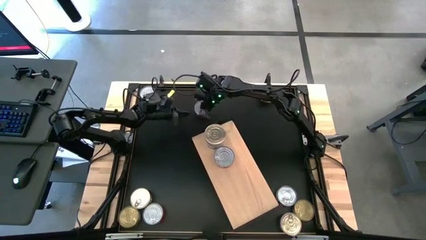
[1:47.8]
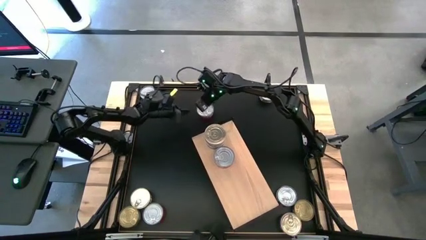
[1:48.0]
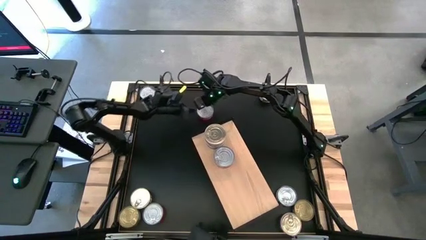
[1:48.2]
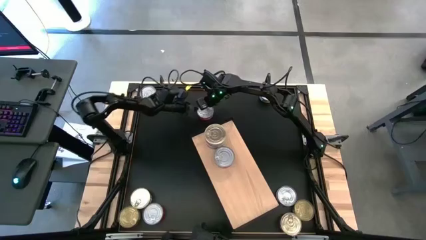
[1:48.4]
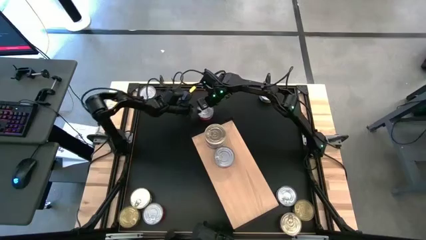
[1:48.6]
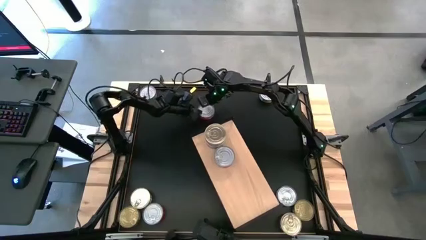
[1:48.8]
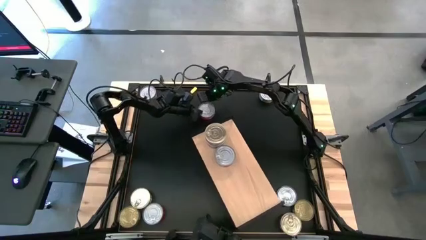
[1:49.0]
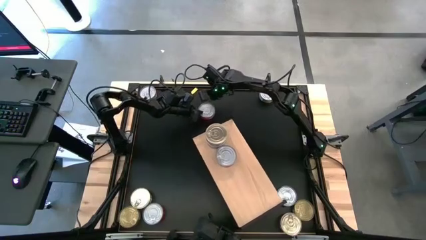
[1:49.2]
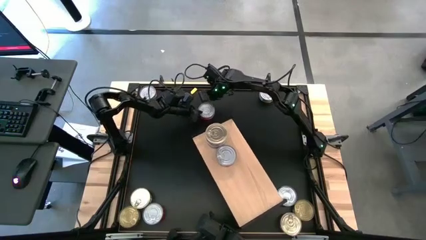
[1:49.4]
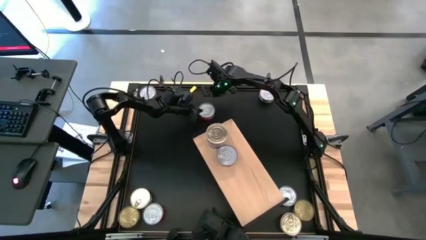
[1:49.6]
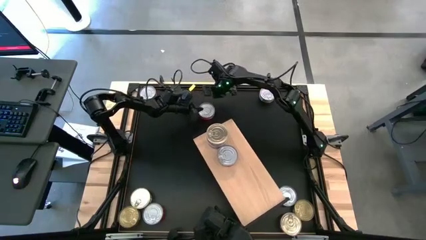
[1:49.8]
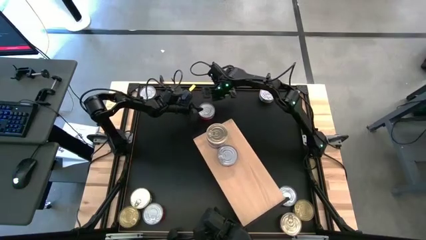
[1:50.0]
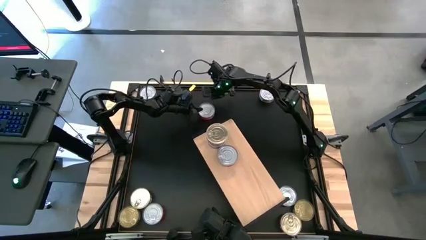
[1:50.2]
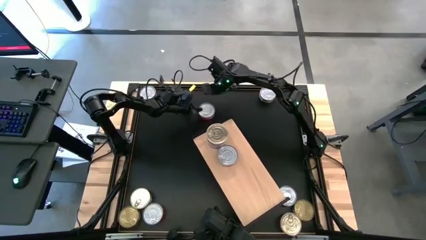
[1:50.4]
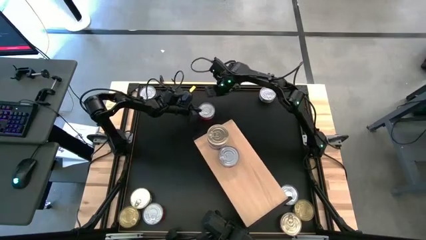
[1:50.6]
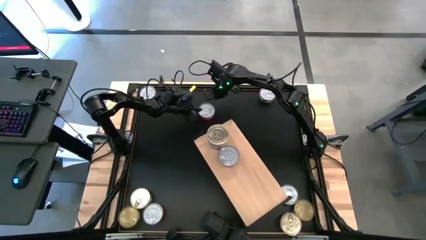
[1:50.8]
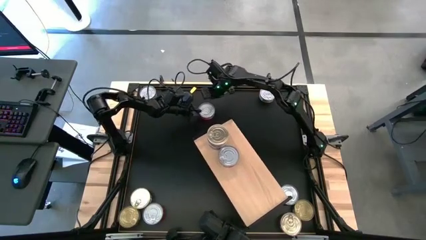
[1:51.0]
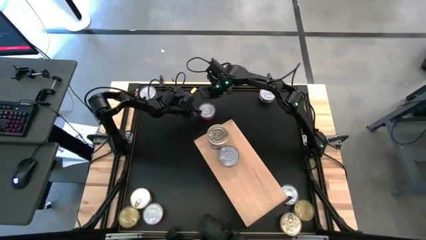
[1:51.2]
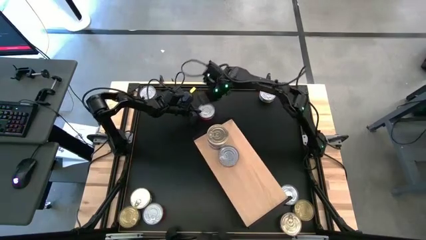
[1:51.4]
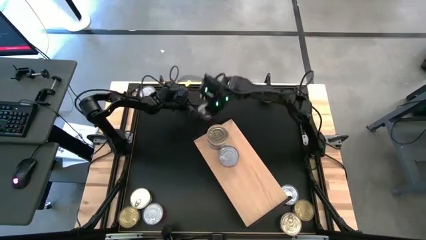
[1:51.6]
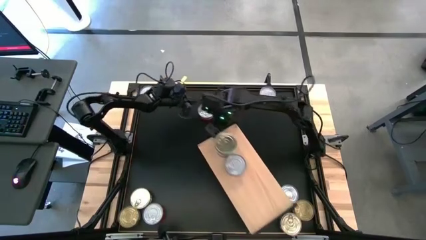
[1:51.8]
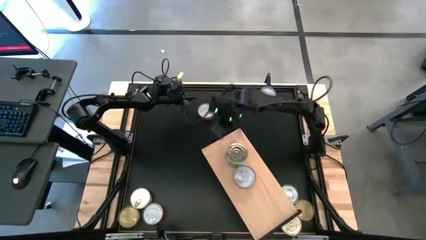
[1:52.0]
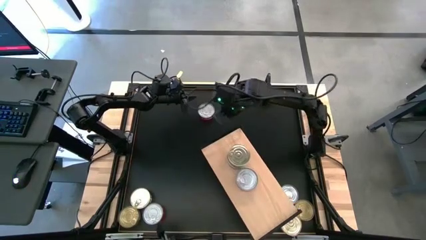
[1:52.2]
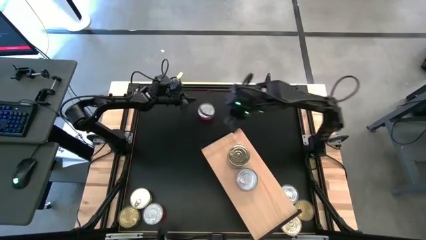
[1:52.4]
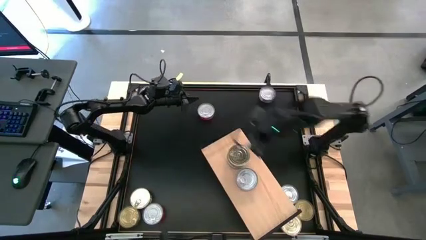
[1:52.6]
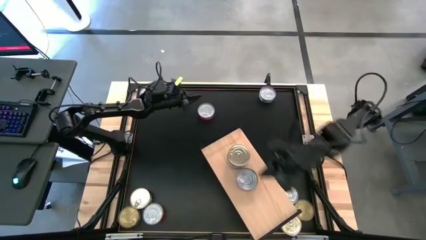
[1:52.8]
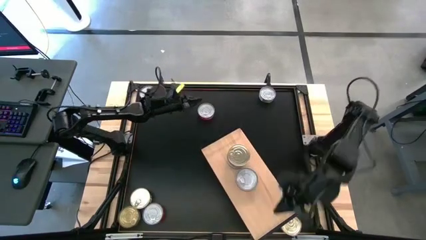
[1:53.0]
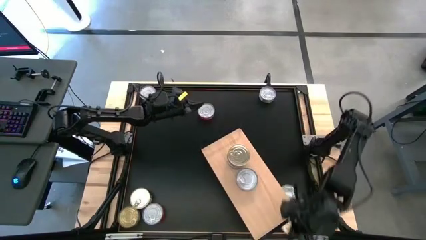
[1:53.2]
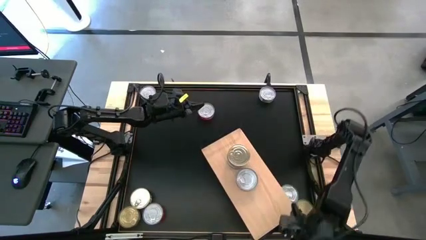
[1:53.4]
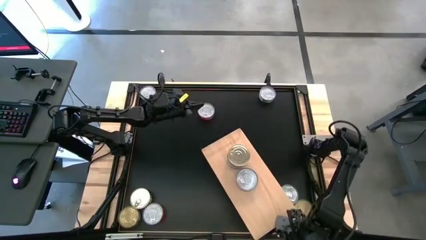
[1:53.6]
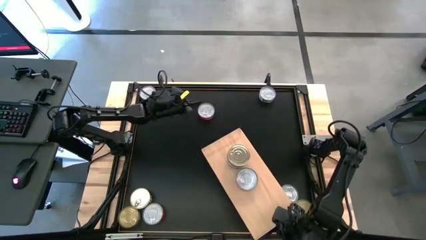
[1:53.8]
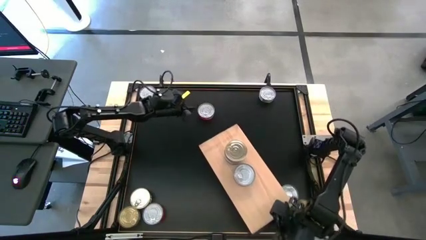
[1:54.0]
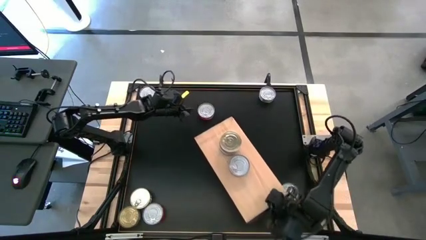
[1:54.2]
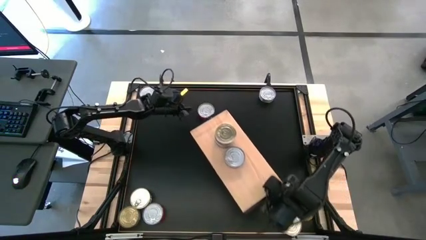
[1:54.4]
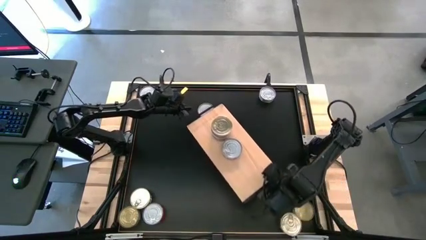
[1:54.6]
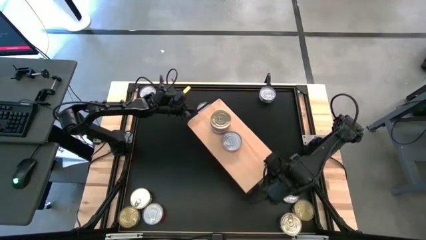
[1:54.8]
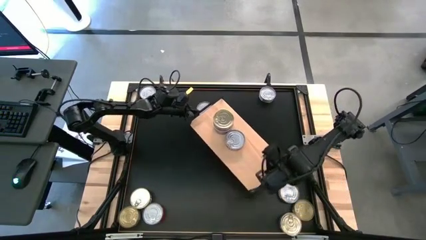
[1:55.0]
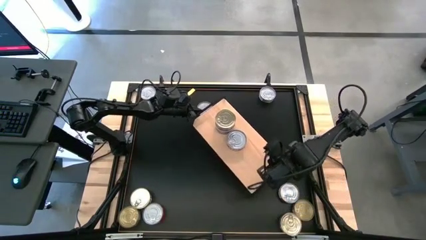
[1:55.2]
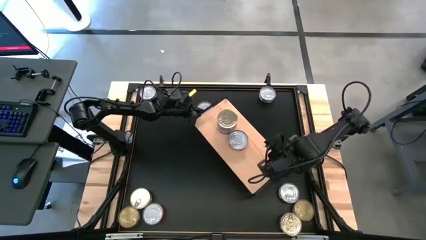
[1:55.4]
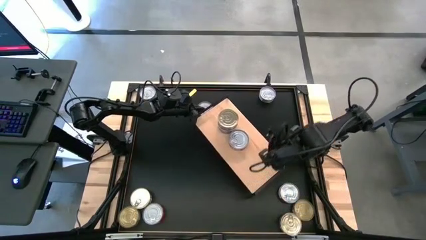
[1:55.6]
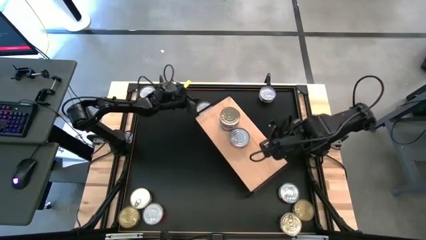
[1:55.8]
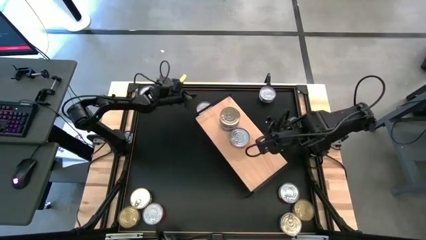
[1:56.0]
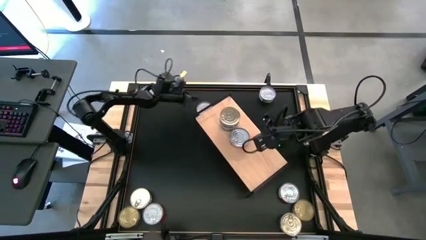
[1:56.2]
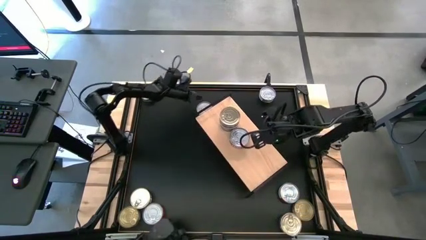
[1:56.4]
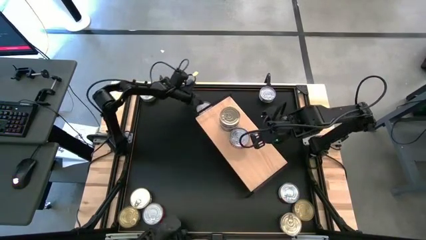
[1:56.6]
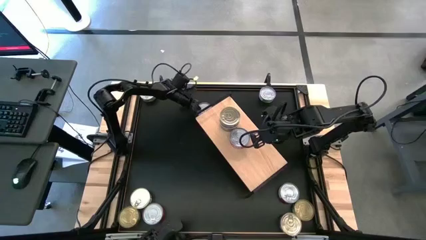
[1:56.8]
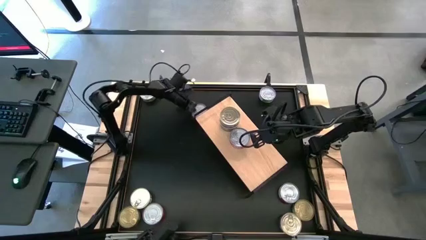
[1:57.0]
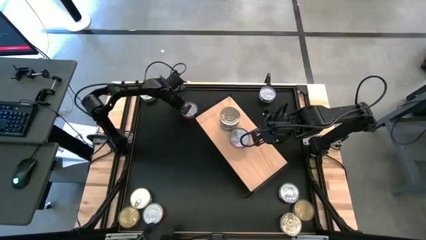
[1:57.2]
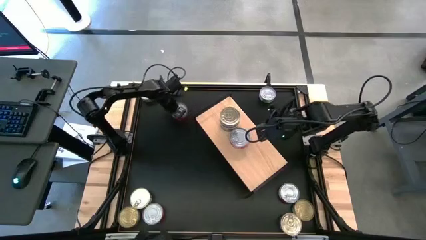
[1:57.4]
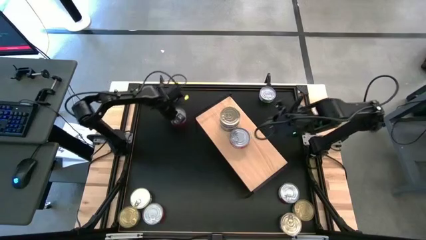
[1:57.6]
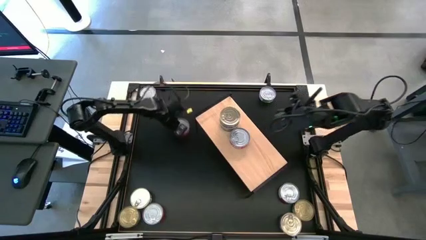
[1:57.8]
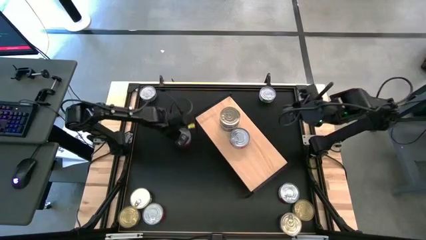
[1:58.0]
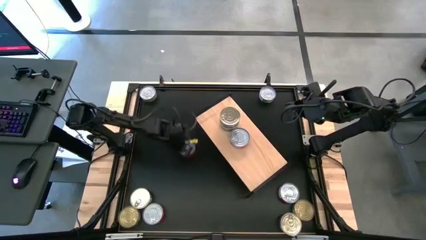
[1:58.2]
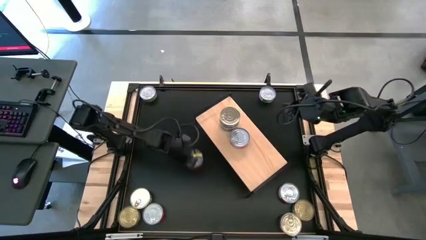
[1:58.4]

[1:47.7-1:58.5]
Task: Stack canned seafood by type on shelf
Stack the red tuna can on top of the red tuna can on the shelf
